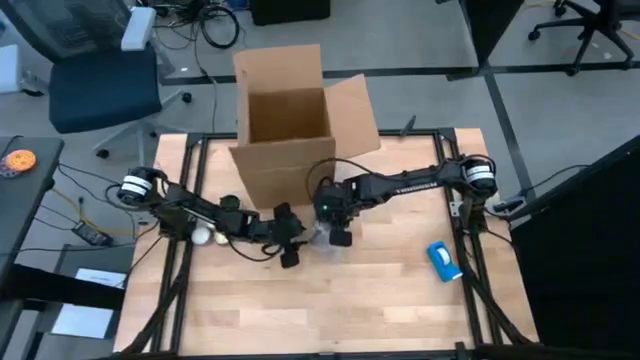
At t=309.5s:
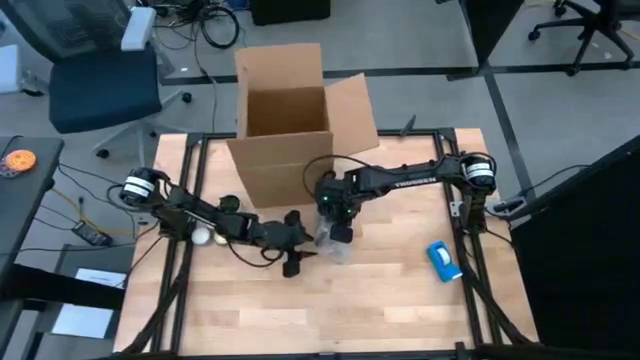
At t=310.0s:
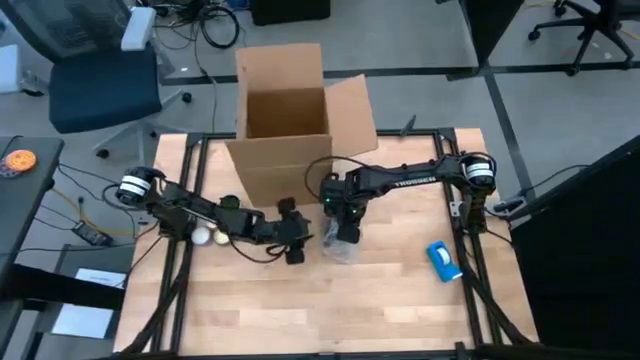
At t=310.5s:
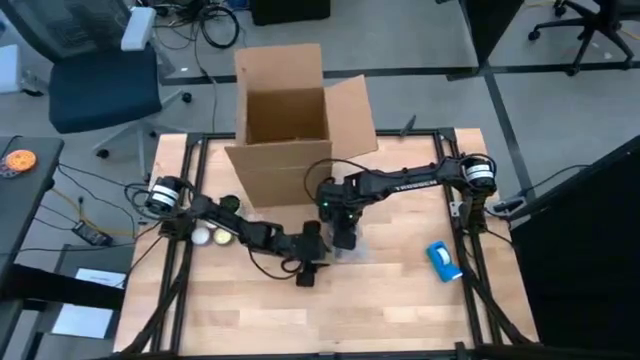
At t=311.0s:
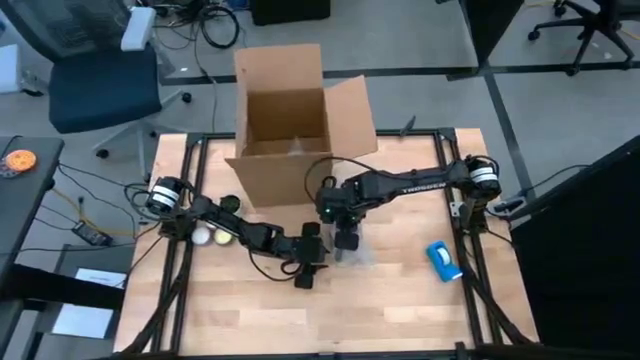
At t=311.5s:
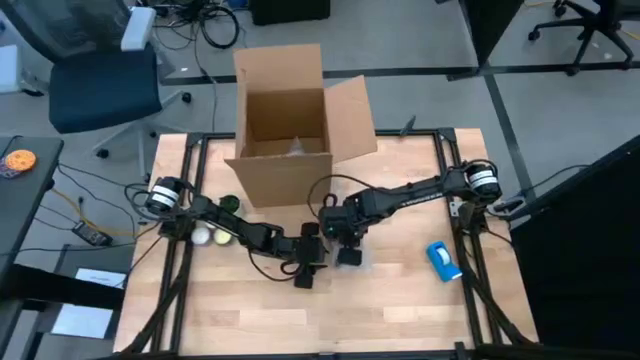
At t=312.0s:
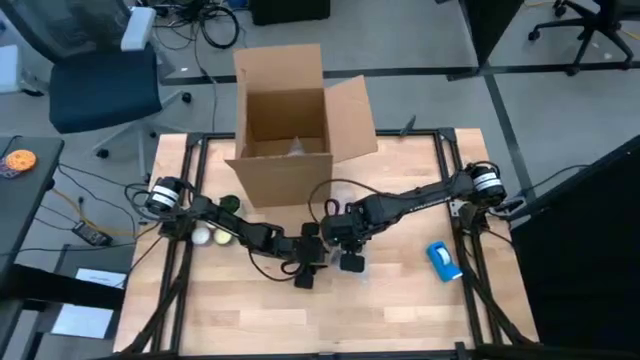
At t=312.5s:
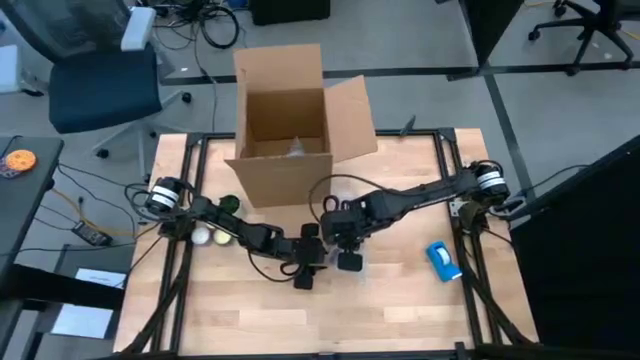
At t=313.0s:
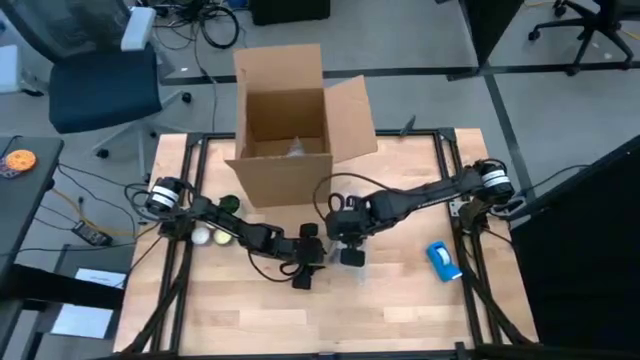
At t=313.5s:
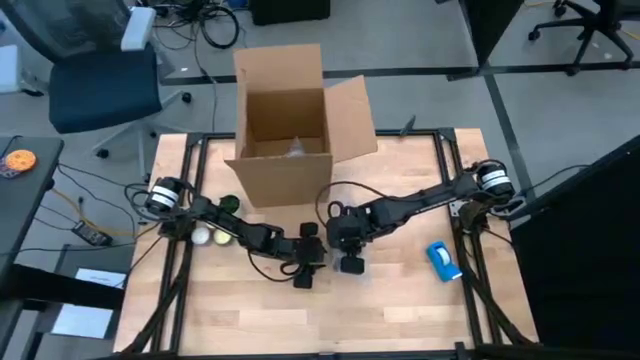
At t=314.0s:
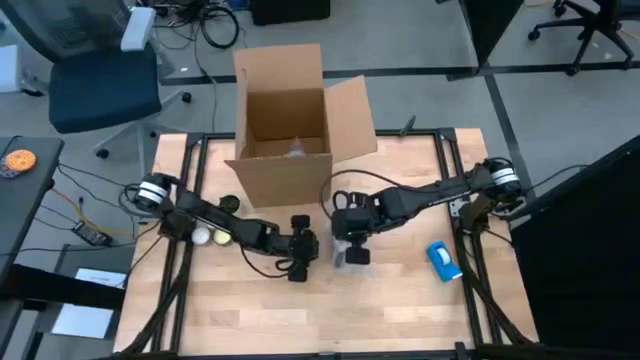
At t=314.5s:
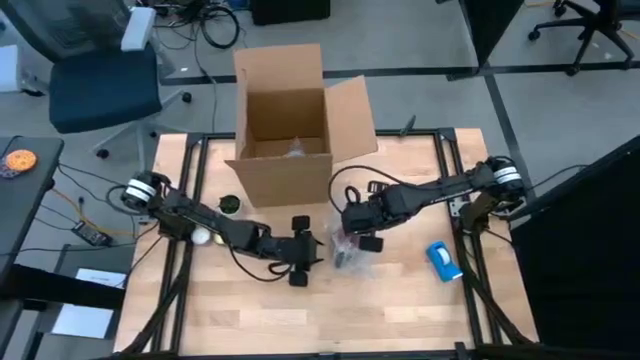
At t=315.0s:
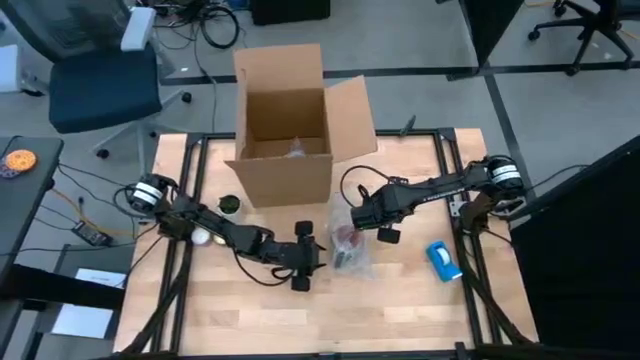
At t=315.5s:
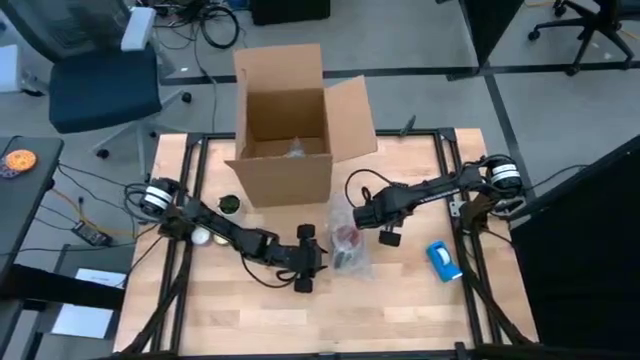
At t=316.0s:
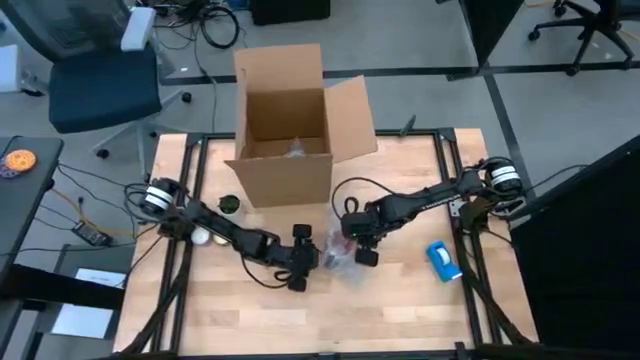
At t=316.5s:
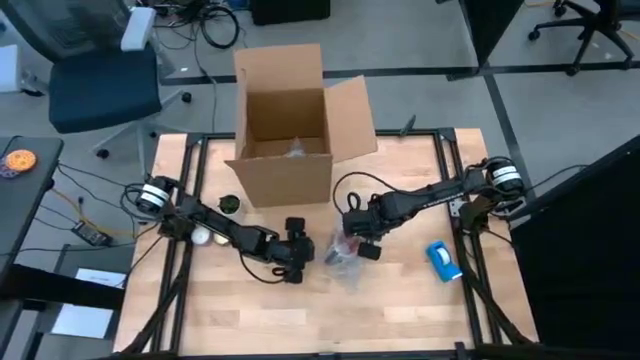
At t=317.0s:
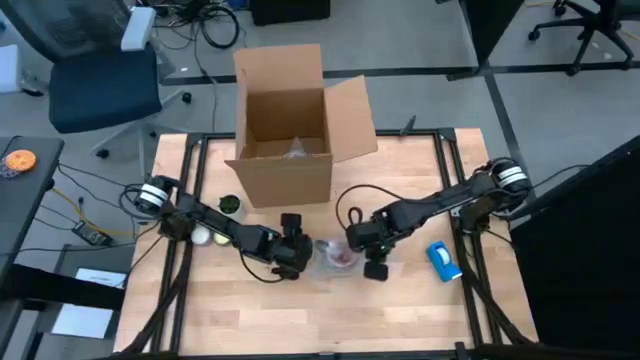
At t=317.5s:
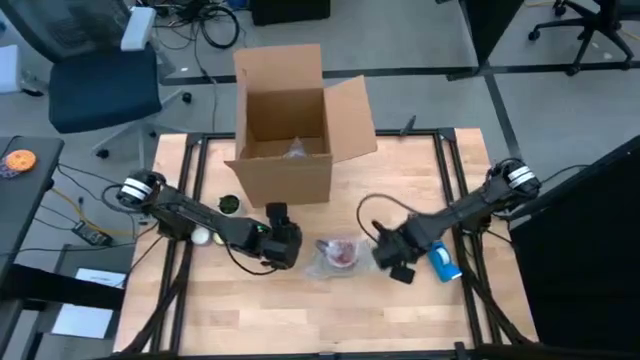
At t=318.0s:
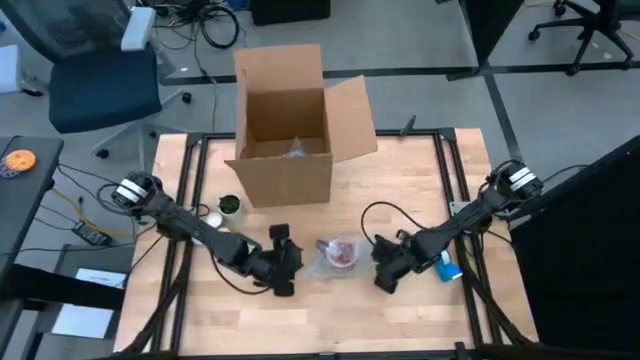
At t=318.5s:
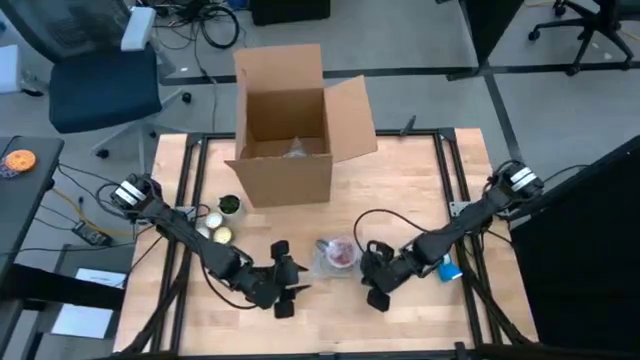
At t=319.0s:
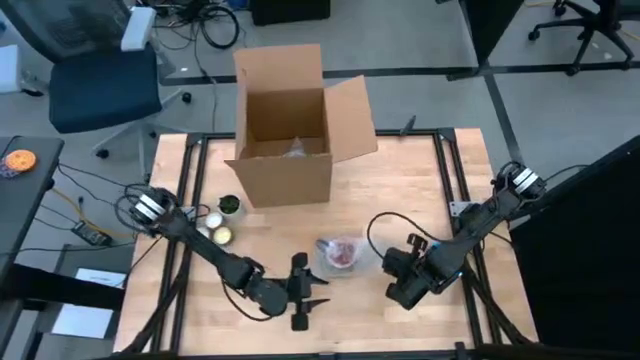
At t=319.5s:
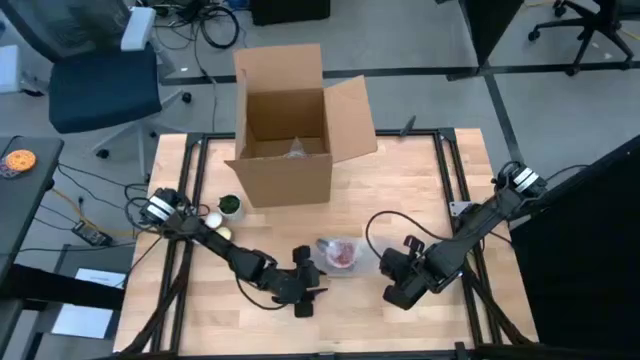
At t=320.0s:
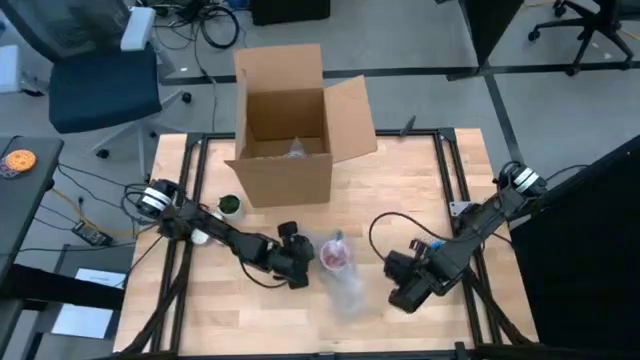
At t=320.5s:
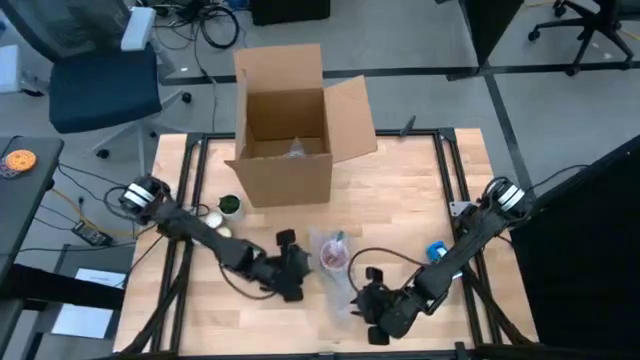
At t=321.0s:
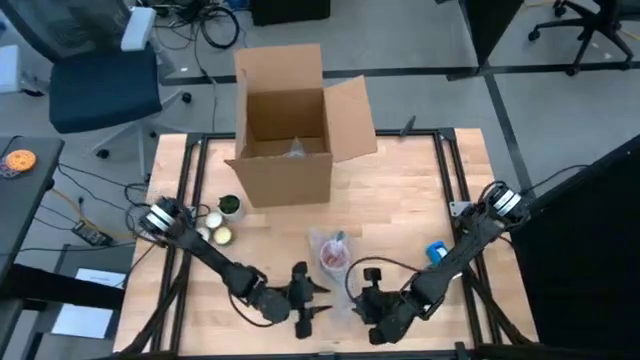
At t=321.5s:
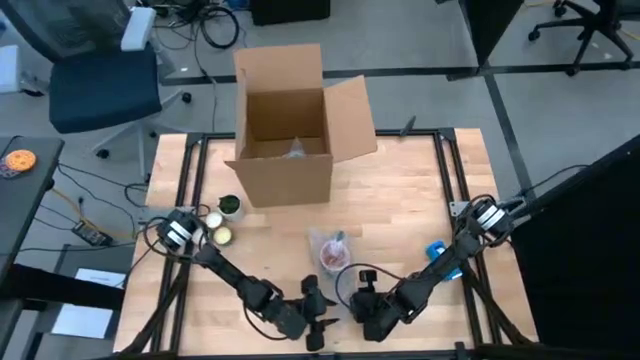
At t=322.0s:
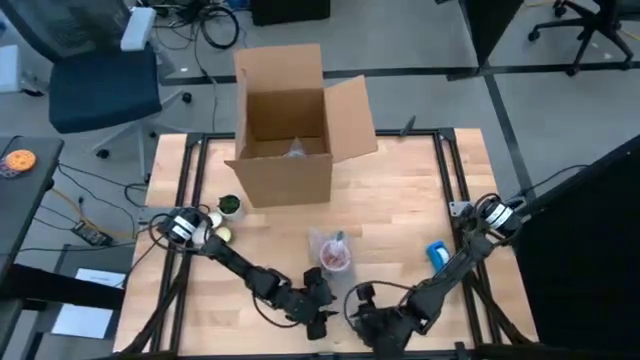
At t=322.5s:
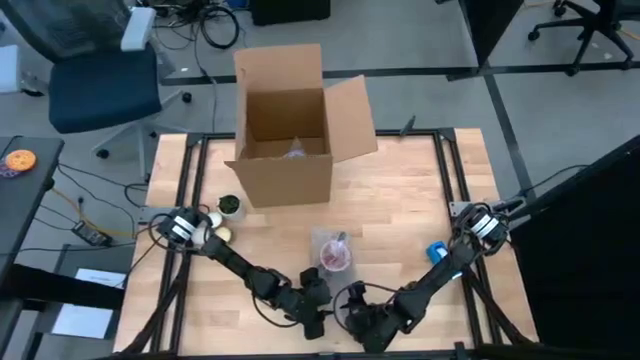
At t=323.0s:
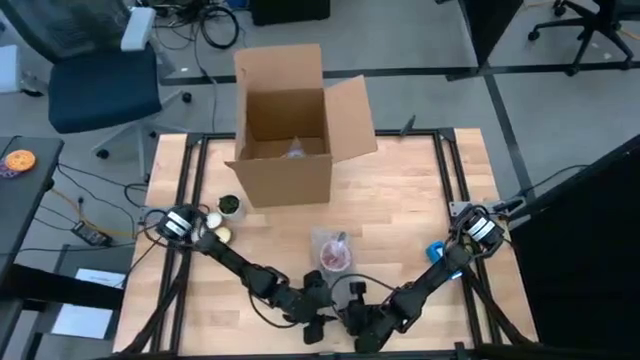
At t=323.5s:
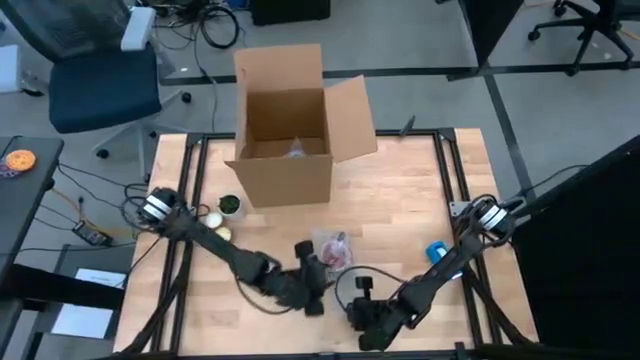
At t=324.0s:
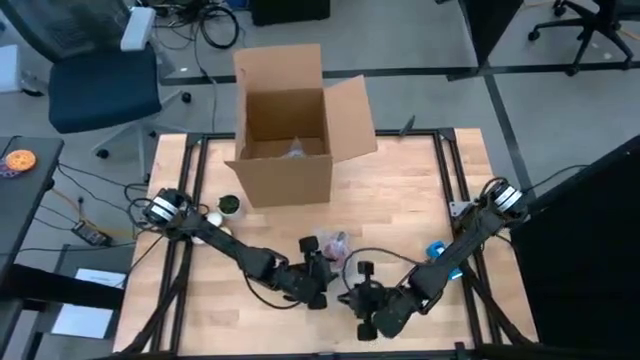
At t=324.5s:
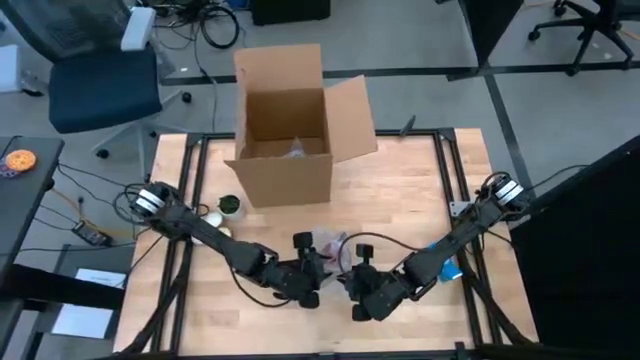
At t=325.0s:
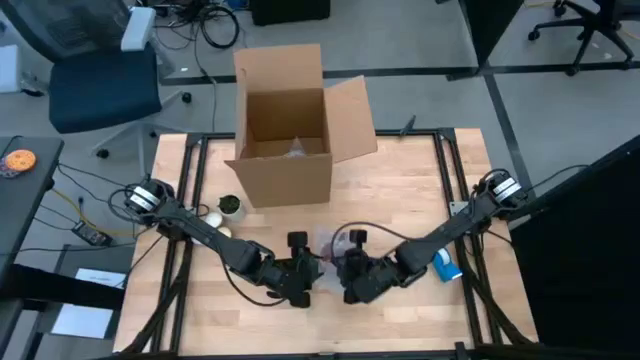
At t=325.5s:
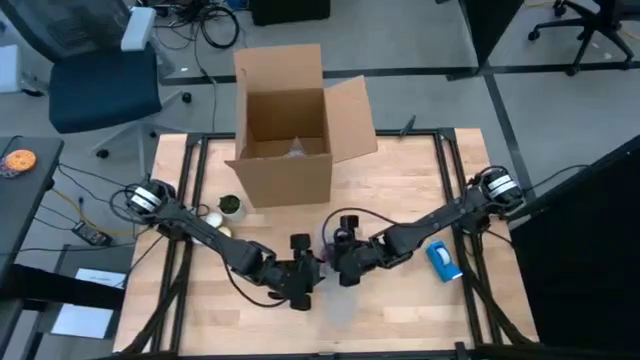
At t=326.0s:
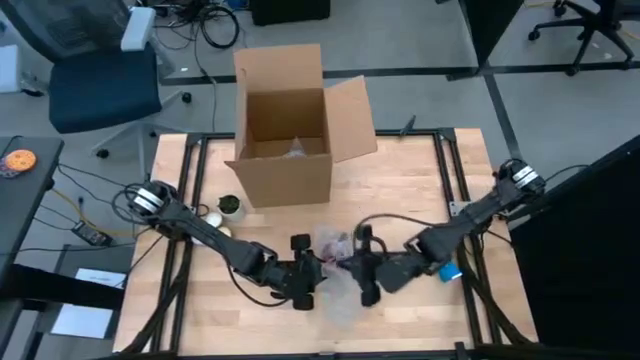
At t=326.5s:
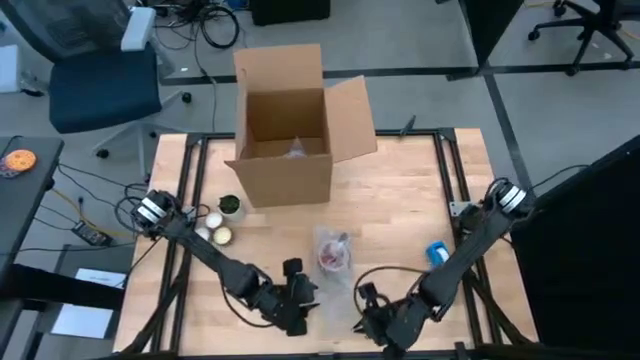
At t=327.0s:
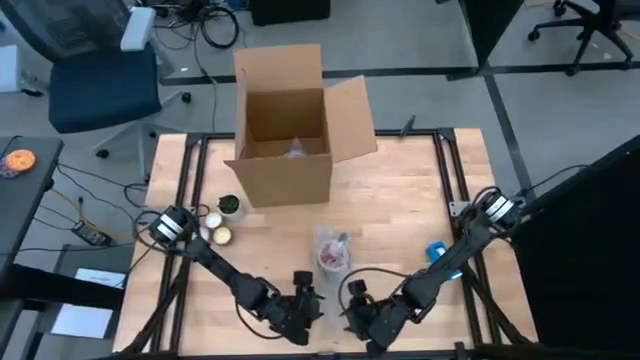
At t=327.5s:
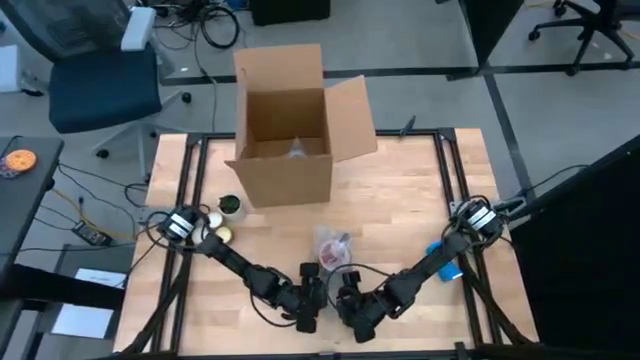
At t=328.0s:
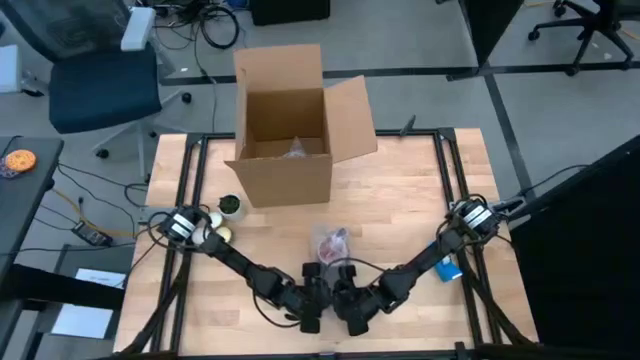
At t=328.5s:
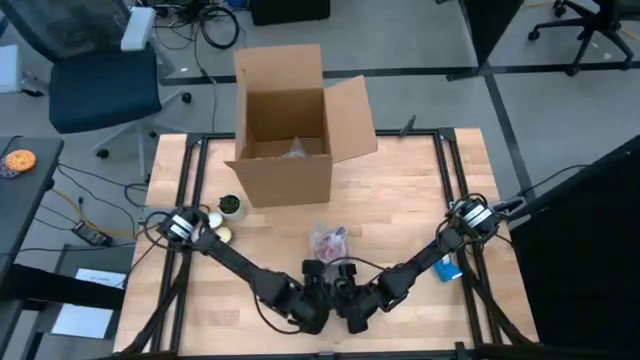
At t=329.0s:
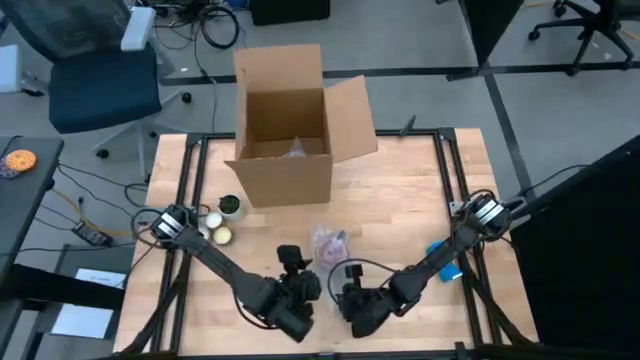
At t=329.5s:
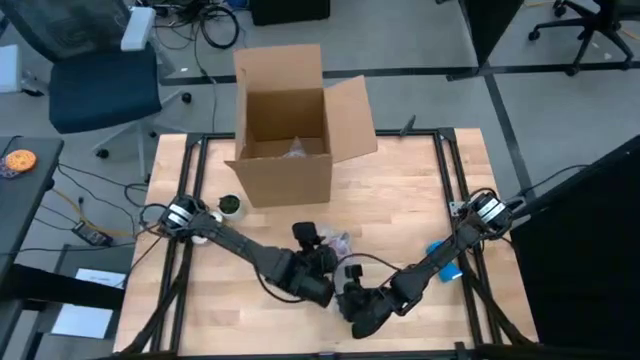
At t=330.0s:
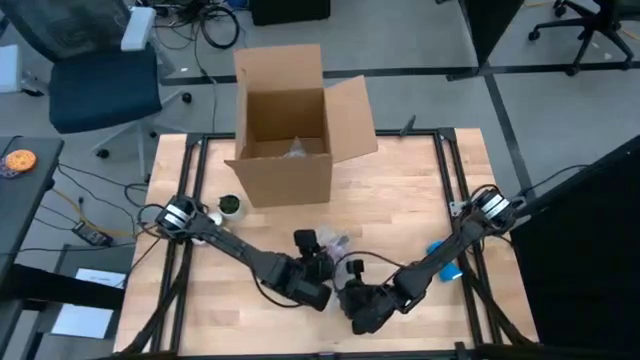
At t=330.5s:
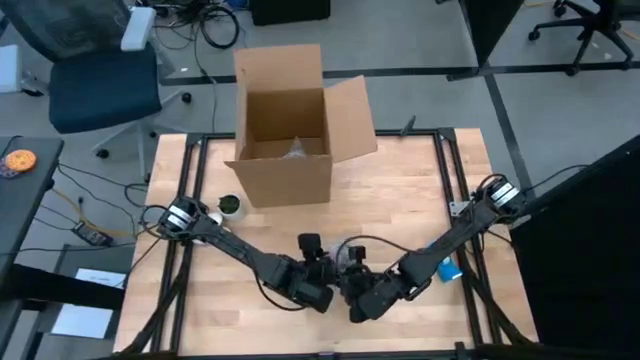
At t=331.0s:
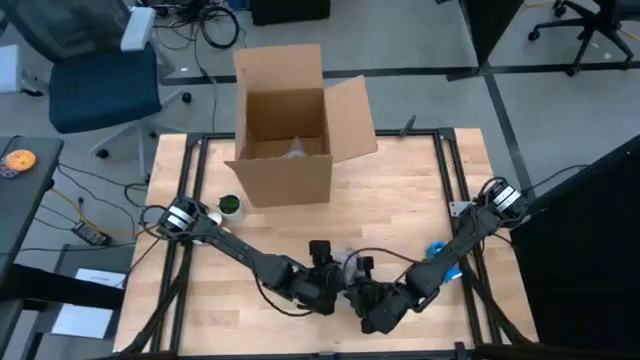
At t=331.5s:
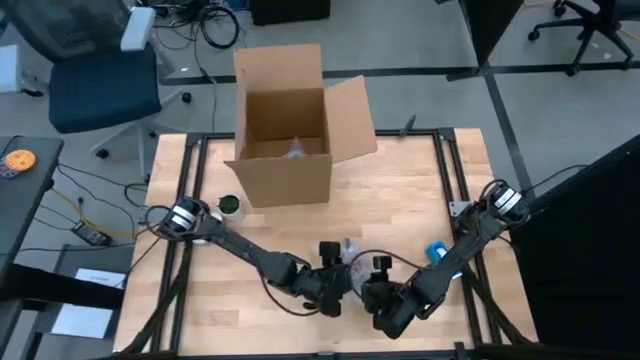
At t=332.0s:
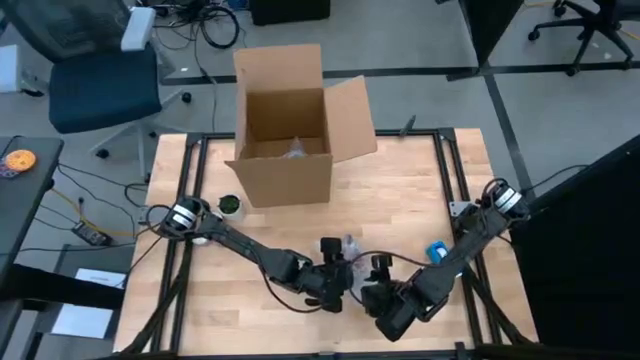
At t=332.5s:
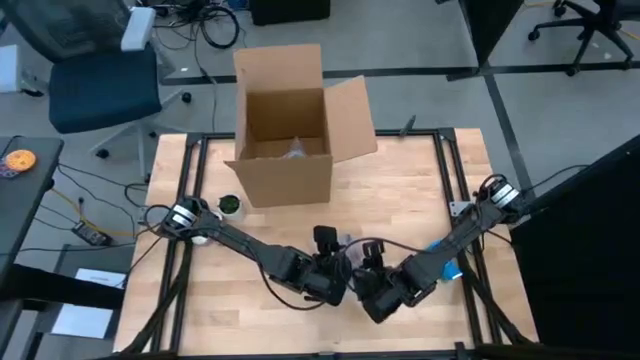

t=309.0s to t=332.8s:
Task: wrap mug
Wrap the black mug with bubble wrap
